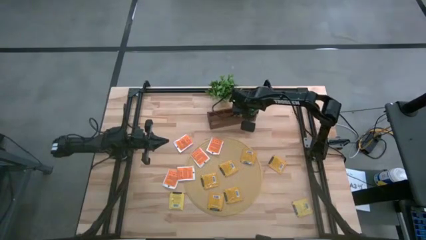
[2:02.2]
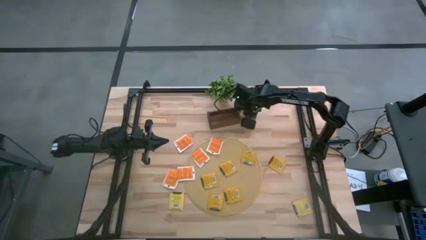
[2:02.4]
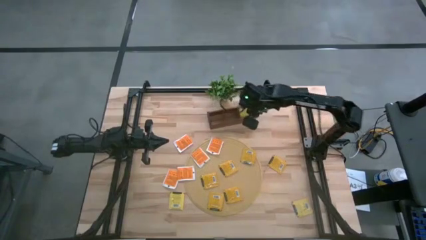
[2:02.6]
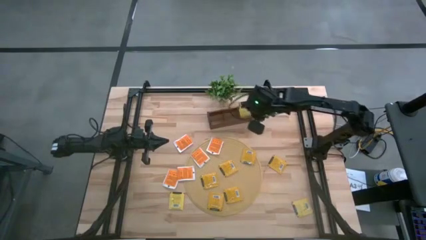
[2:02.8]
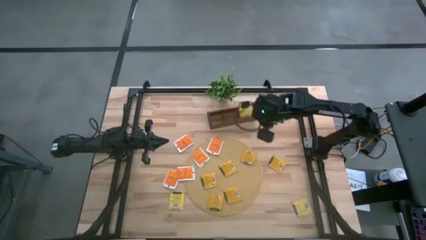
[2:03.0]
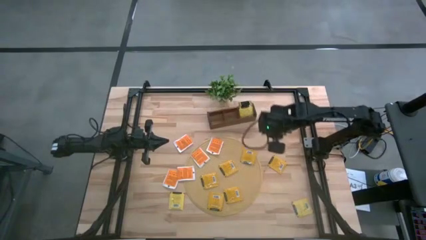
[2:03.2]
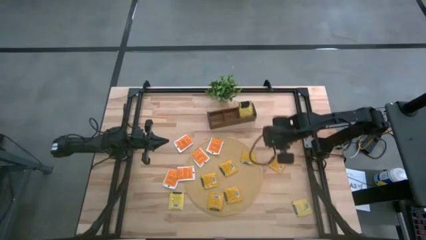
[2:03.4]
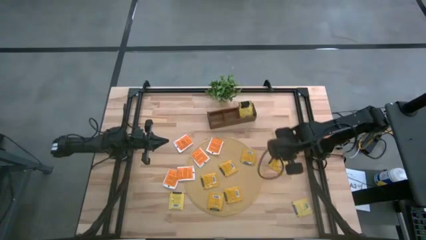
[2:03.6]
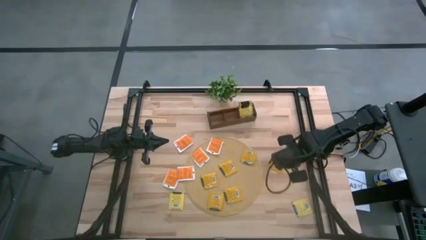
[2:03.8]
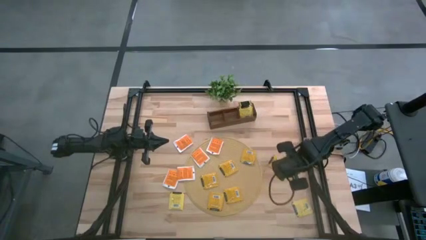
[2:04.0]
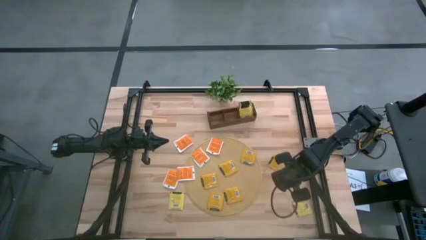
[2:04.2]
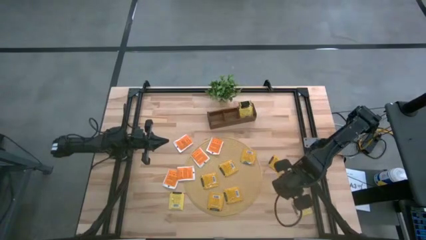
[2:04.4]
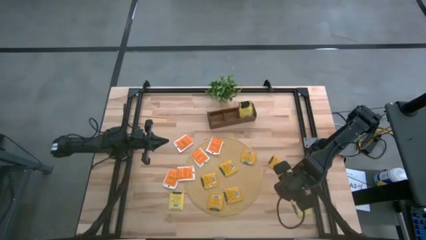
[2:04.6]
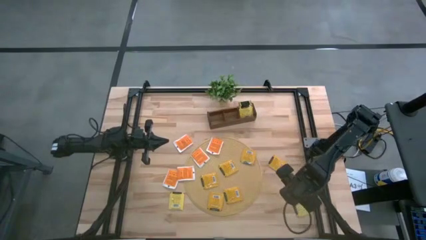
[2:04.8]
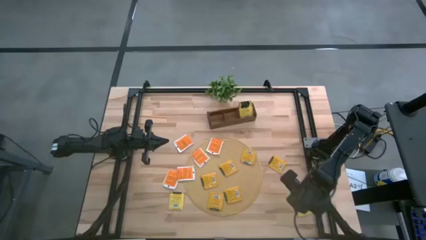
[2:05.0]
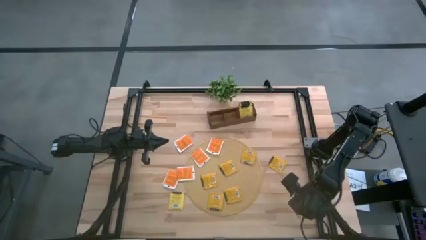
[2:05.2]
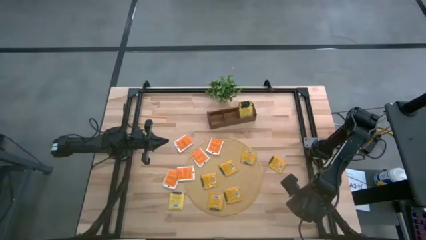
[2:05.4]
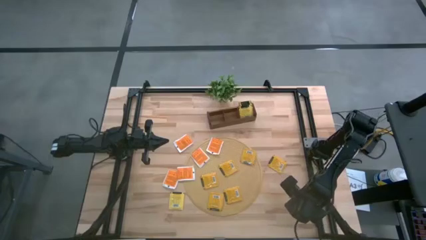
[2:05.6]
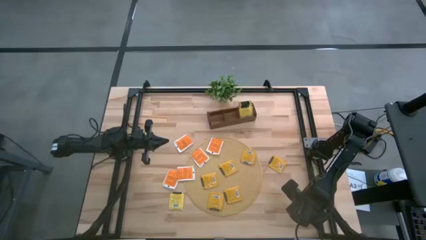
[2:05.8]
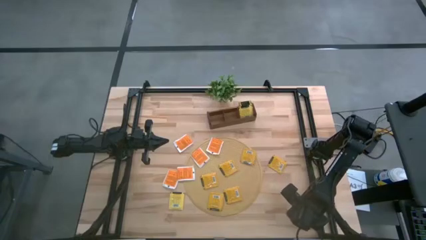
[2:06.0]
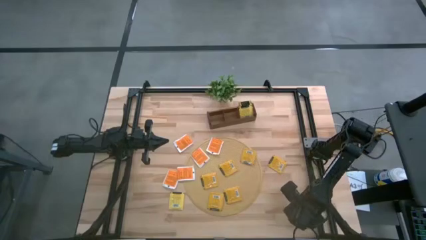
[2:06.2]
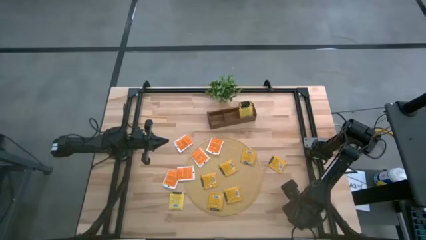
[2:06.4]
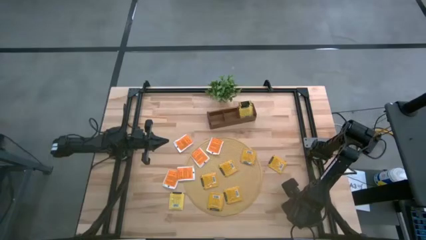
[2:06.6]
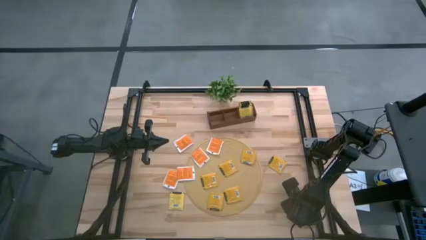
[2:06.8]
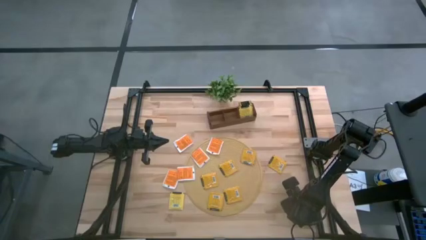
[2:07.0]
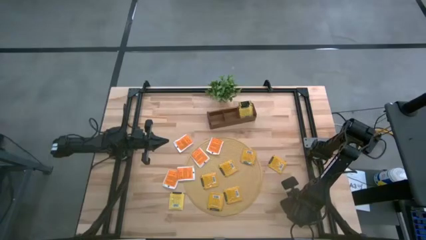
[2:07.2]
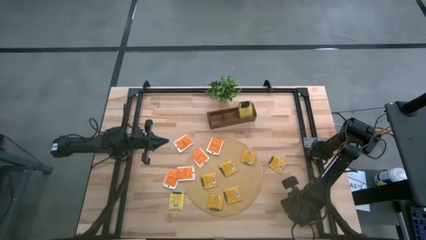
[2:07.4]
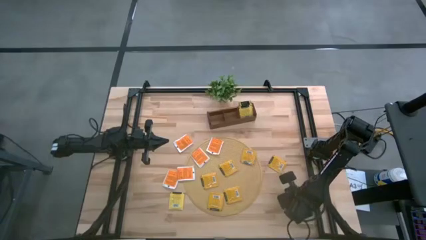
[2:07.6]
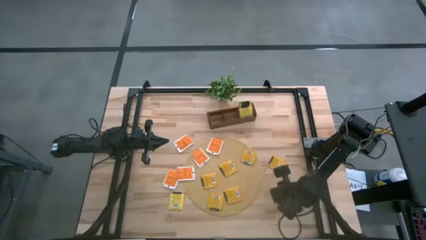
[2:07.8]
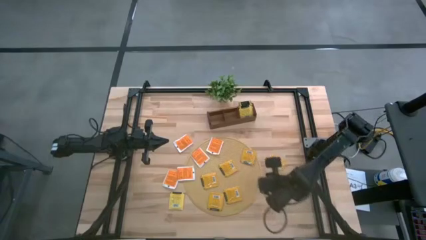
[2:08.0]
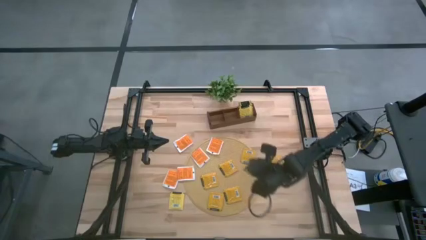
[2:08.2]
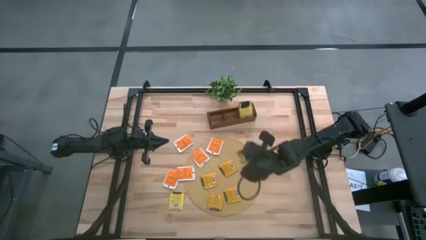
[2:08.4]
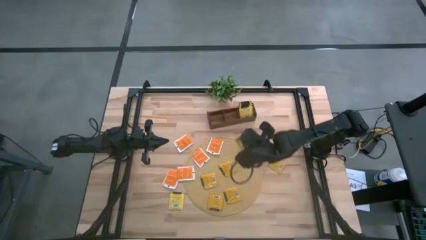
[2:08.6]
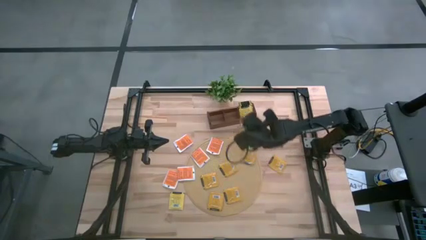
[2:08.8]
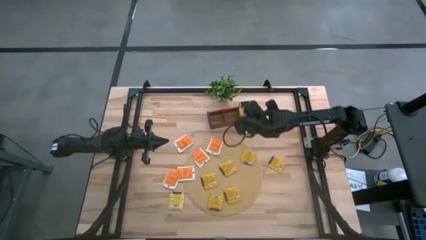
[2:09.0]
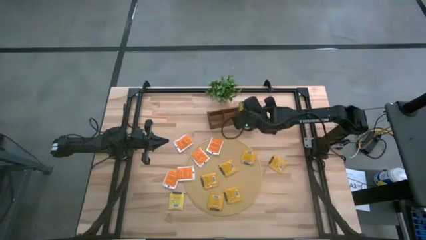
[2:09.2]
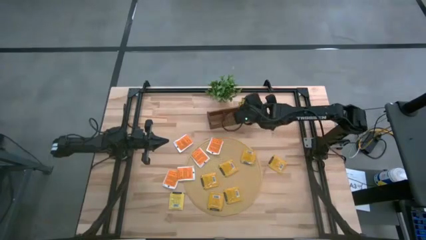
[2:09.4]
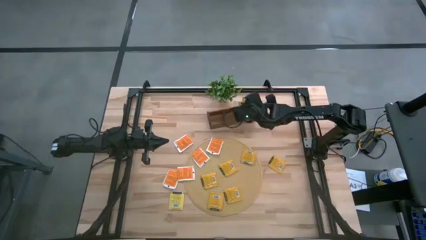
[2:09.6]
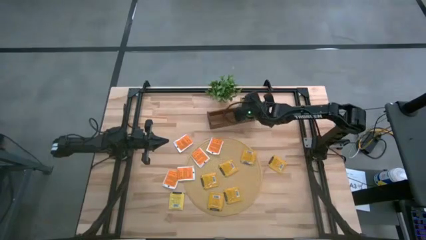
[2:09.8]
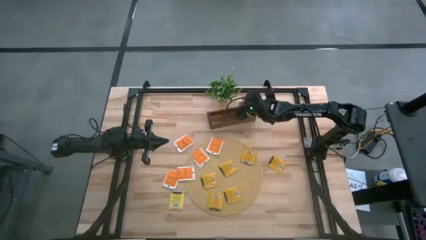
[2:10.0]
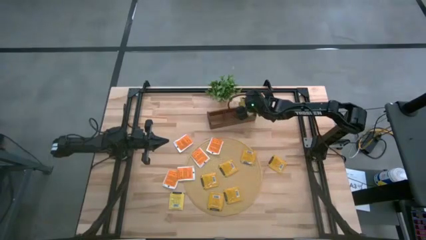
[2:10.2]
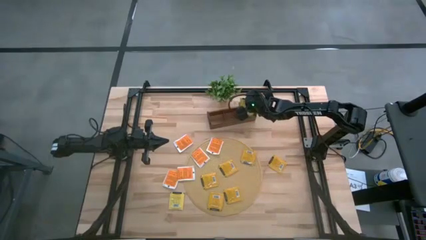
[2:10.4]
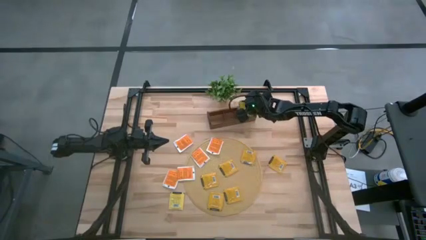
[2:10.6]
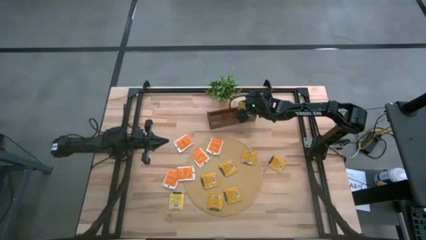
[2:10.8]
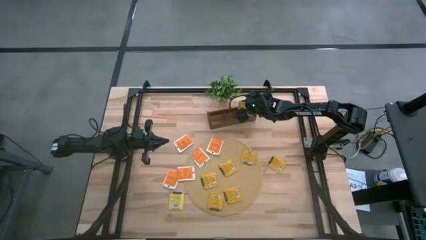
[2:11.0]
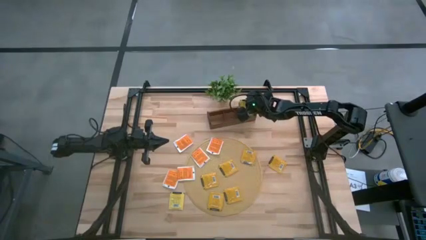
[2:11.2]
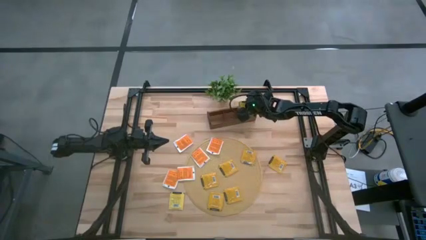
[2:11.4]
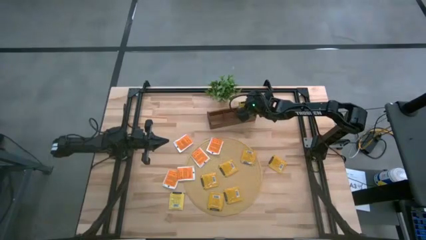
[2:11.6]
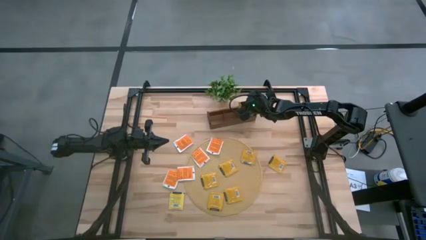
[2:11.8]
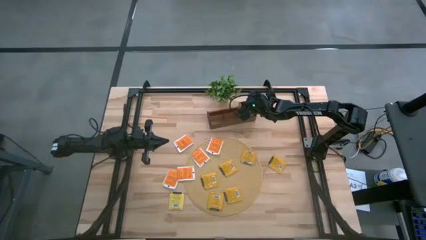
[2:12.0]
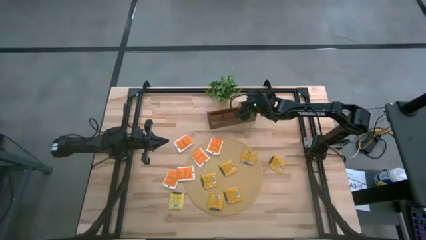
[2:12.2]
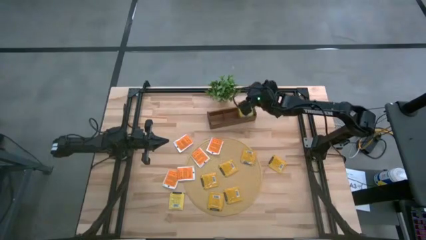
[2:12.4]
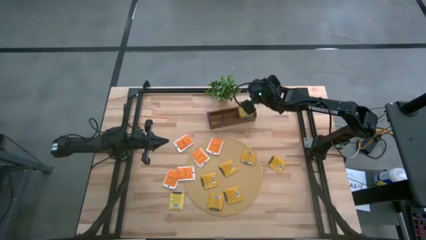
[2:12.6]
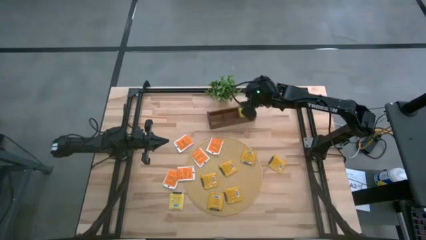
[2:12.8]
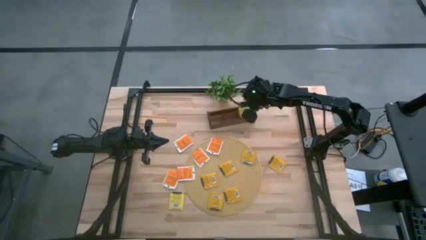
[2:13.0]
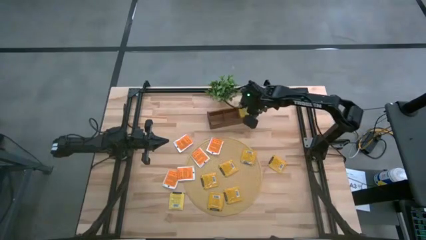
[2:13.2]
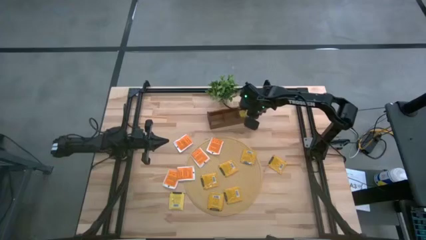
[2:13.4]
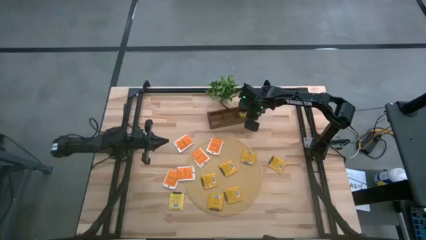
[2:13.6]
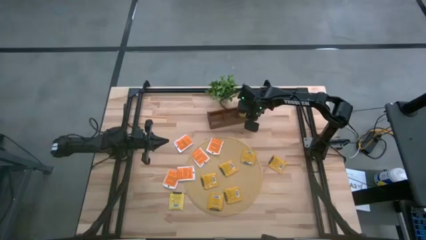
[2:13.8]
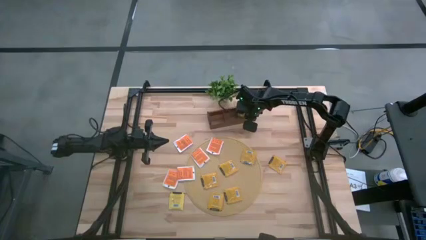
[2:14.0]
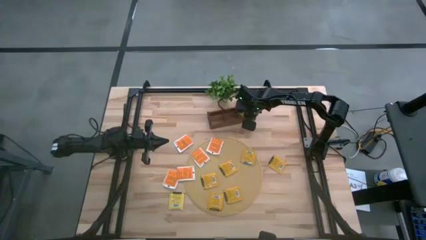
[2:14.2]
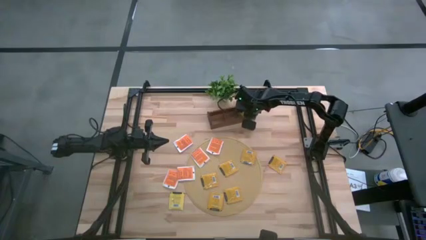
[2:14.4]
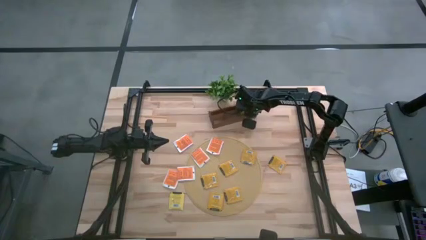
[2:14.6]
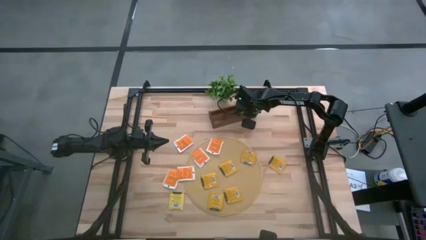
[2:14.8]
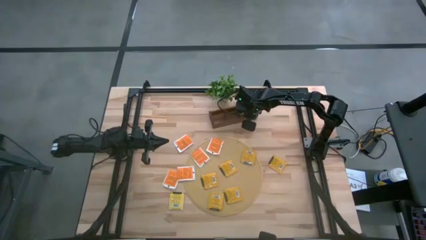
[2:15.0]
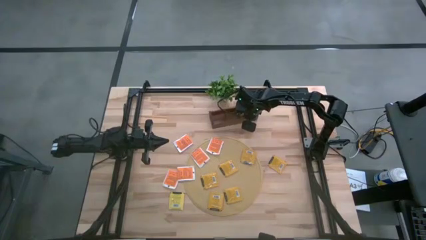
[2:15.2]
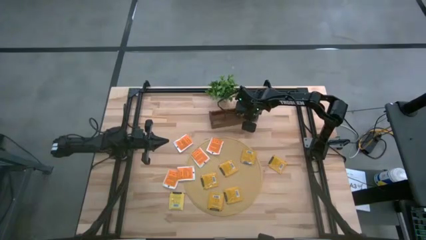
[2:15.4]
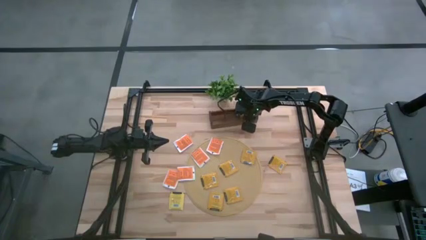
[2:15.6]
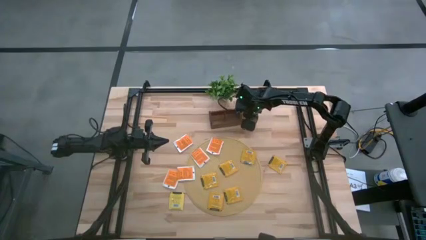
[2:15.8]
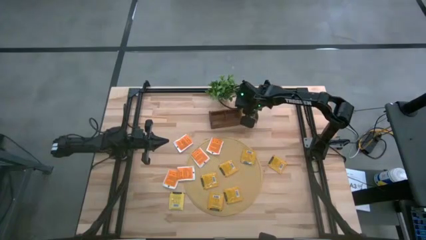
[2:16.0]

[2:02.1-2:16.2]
Task: Pick & Place Tea
Put the yellow tea bag into the right section of the wooden organizer

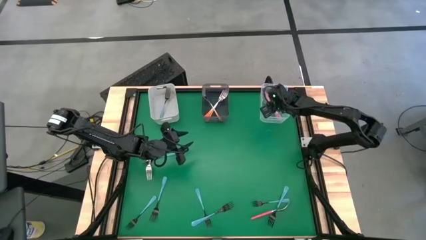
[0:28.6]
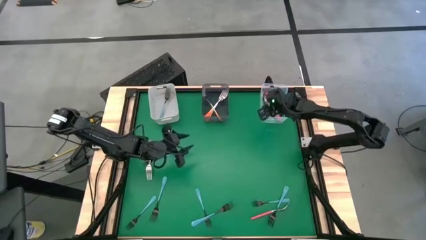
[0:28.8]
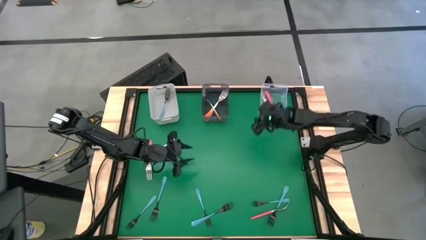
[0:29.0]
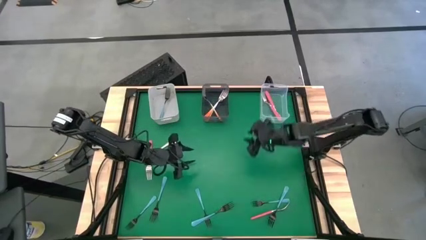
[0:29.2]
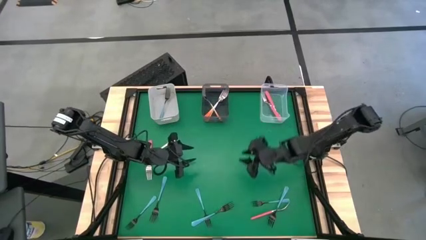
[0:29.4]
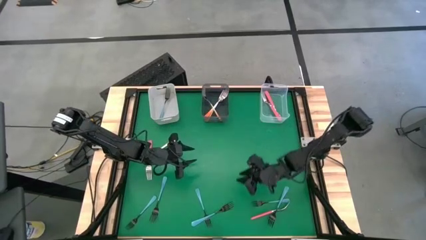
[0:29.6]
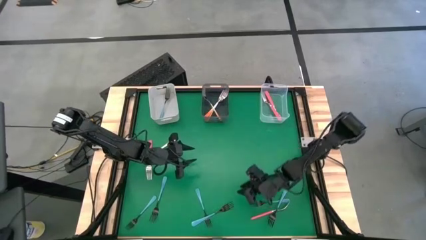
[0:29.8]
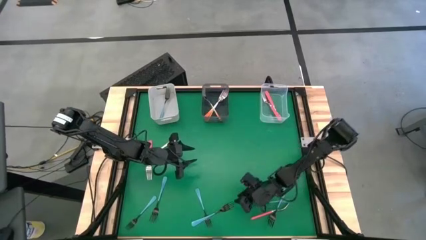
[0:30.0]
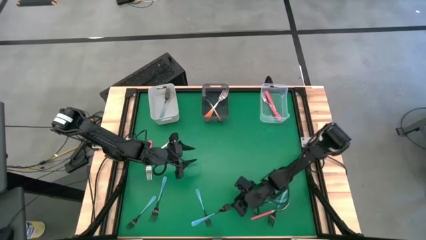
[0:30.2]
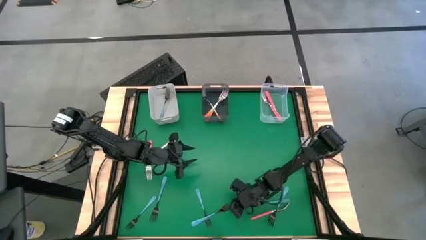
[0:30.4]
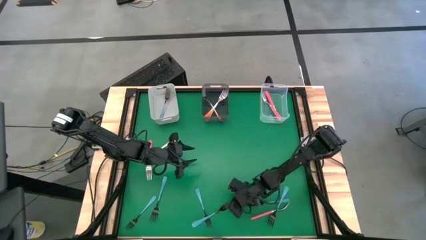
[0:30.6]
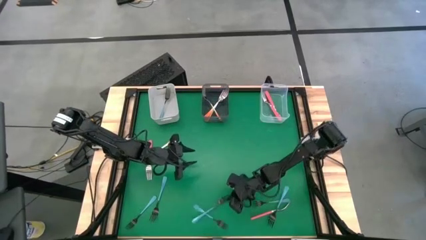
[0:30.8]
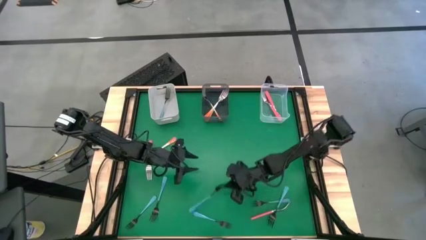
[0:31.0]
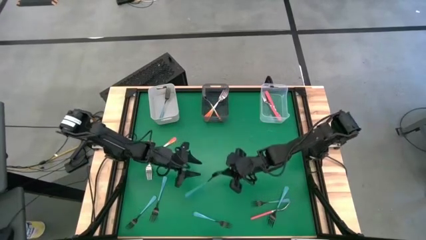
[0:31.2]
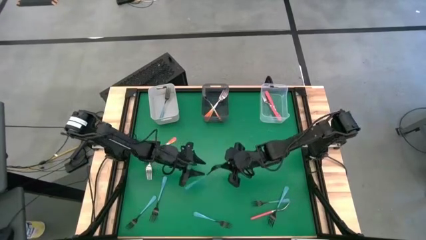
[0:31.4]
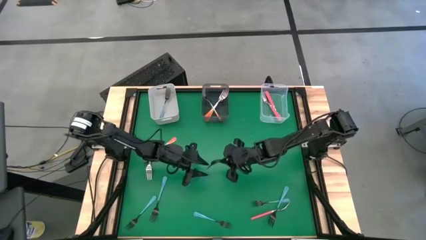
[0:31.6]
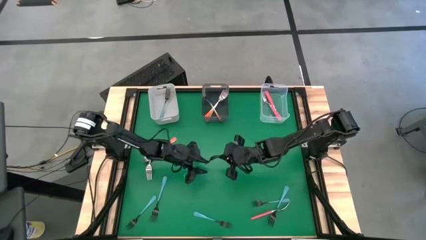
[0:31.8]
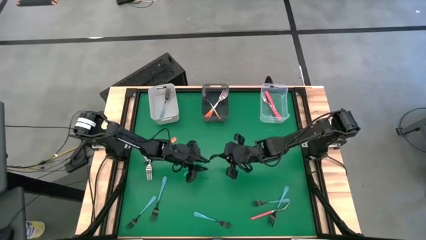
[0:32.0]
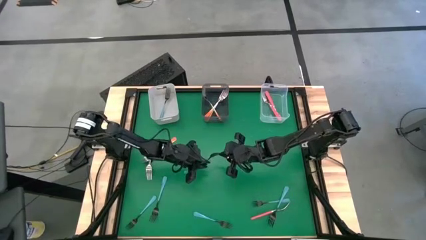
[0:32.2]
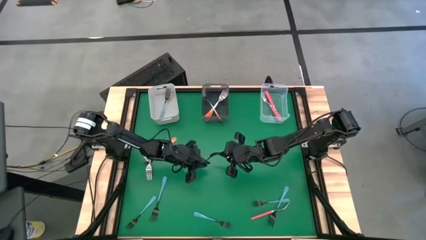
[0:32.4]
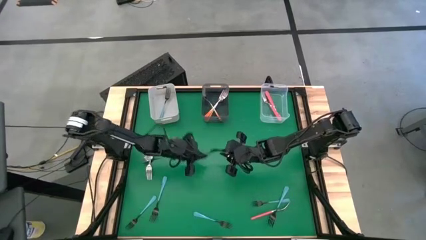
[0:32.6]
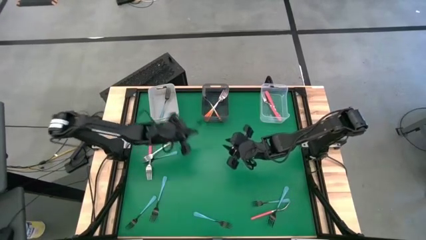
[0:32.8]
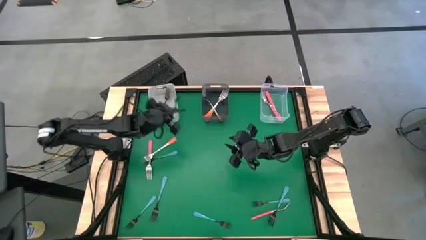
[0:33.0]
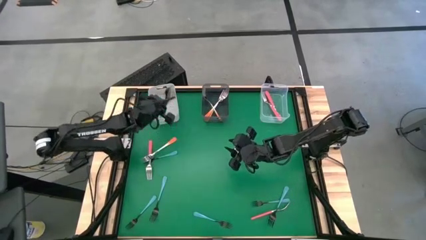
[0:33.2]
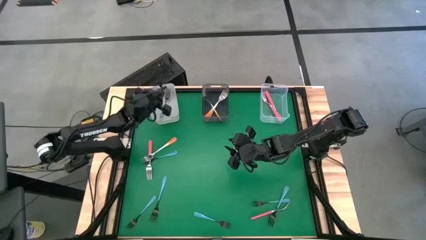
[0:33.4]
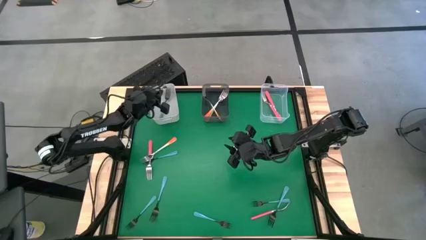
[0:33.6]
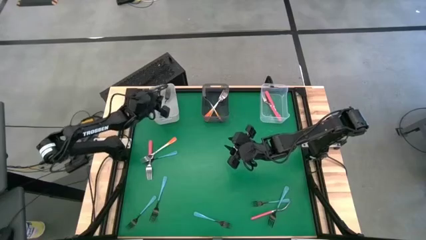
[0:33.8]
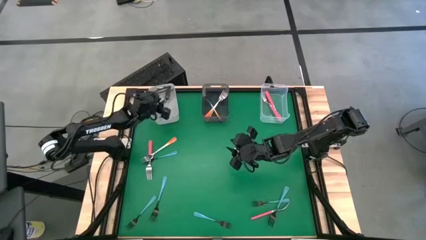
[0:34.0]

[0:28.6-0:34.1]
Task: Sort silverware by color (type)
Put the blue fork into the white bin
